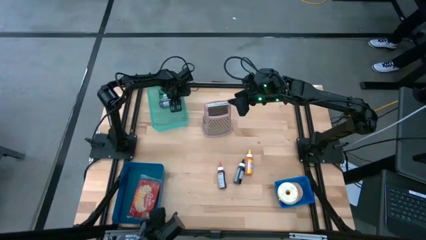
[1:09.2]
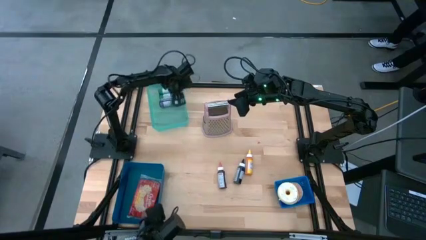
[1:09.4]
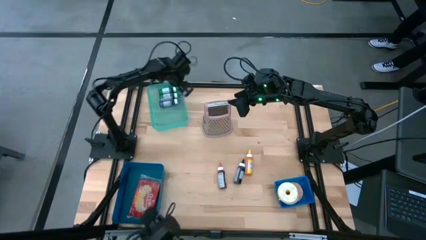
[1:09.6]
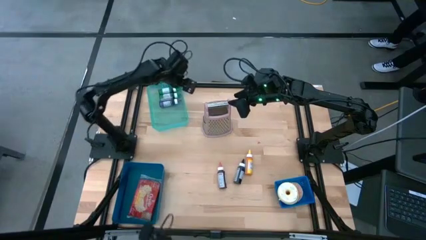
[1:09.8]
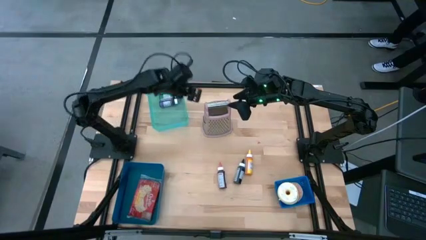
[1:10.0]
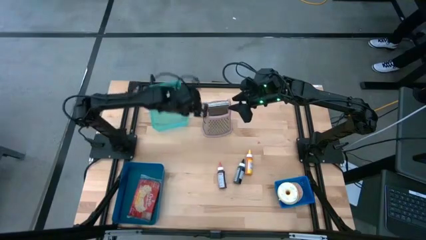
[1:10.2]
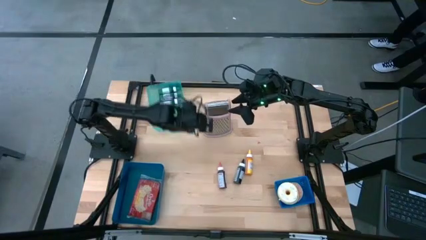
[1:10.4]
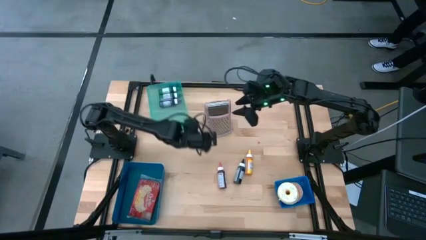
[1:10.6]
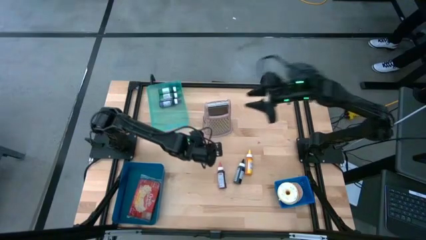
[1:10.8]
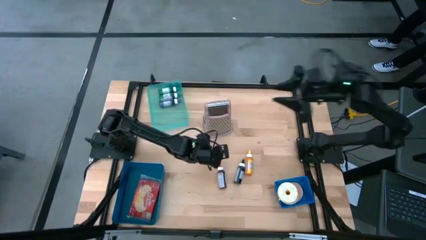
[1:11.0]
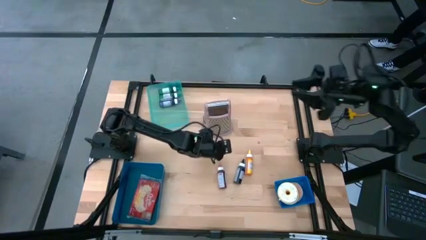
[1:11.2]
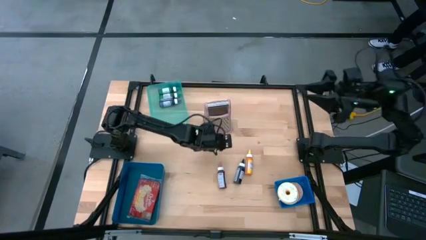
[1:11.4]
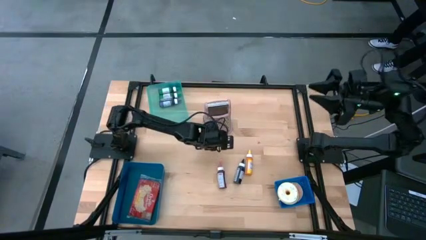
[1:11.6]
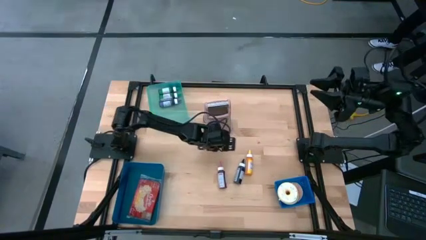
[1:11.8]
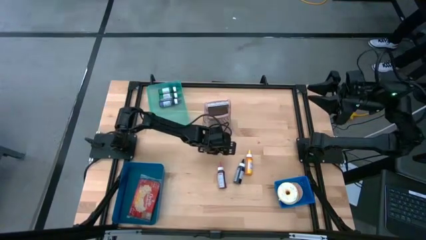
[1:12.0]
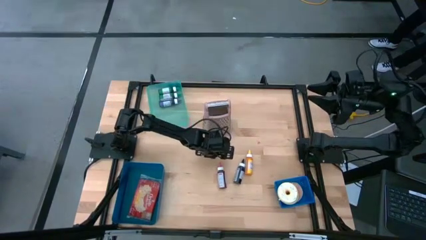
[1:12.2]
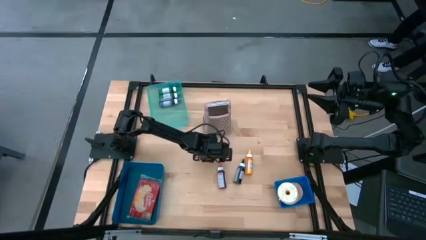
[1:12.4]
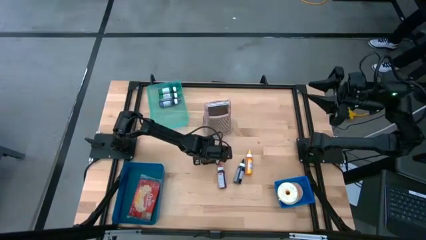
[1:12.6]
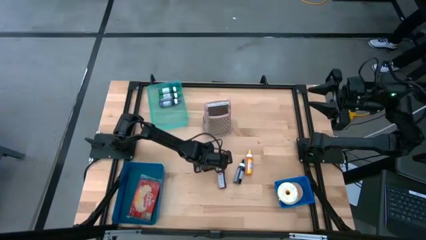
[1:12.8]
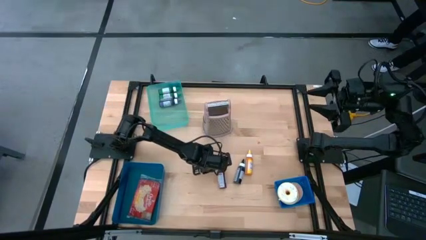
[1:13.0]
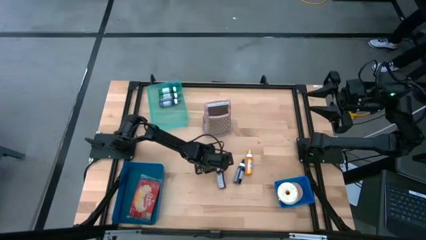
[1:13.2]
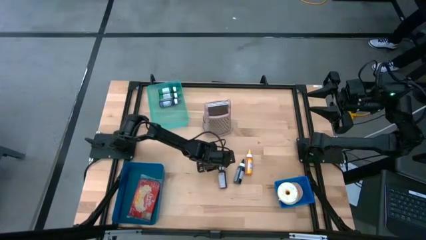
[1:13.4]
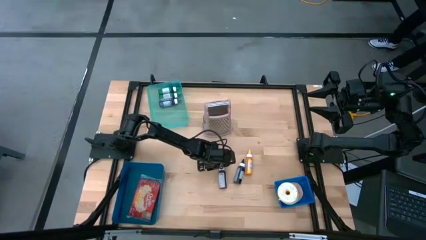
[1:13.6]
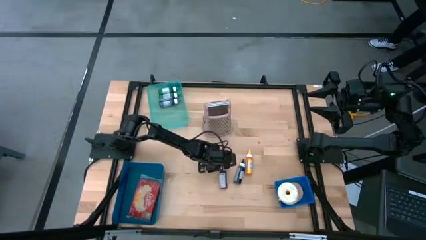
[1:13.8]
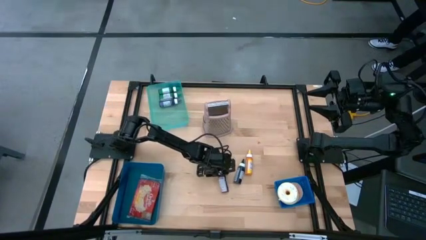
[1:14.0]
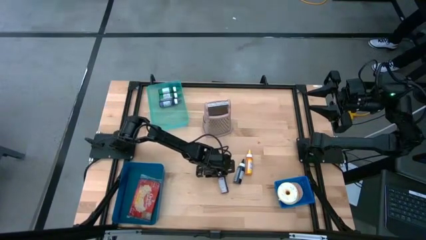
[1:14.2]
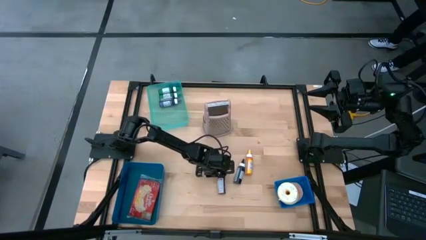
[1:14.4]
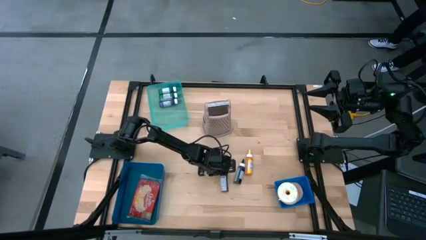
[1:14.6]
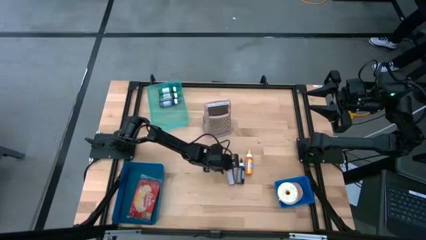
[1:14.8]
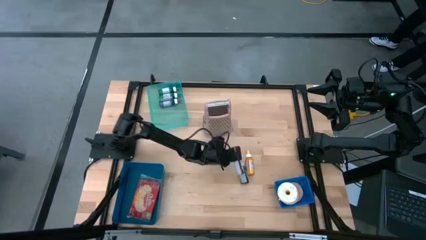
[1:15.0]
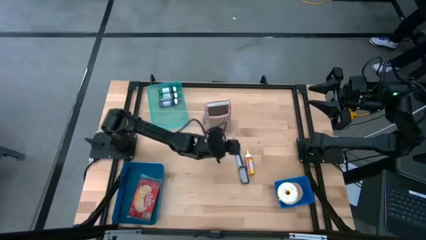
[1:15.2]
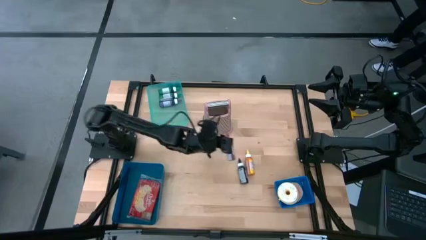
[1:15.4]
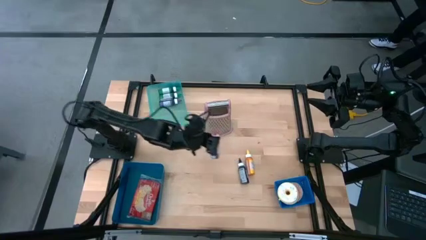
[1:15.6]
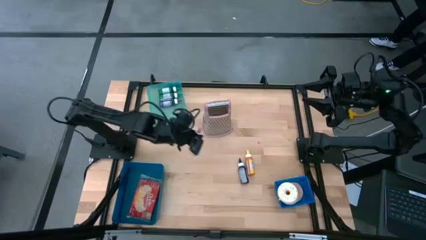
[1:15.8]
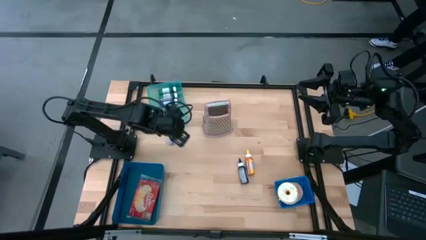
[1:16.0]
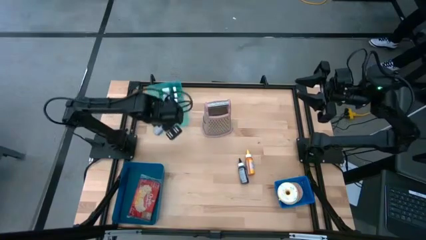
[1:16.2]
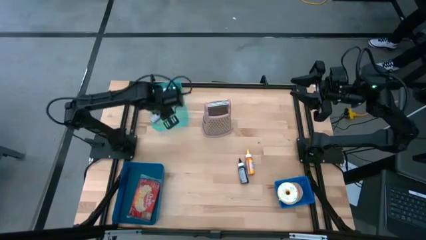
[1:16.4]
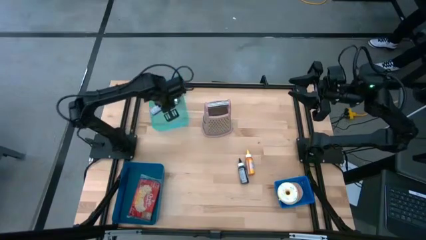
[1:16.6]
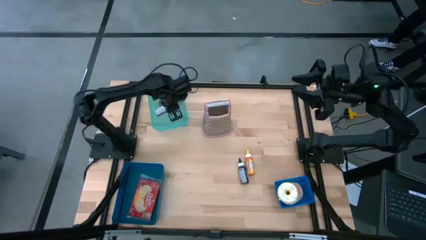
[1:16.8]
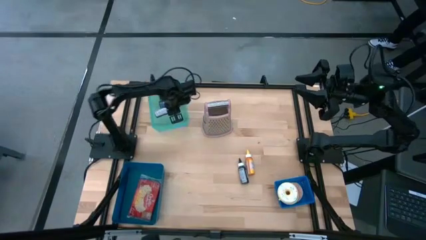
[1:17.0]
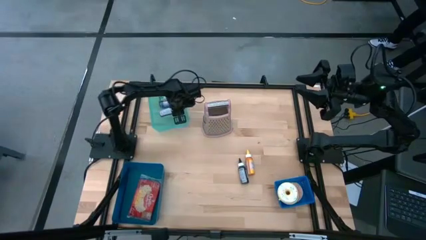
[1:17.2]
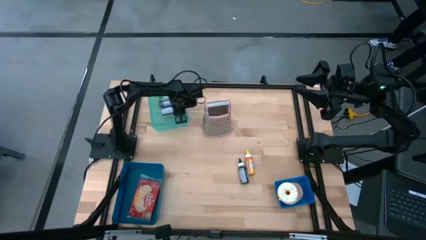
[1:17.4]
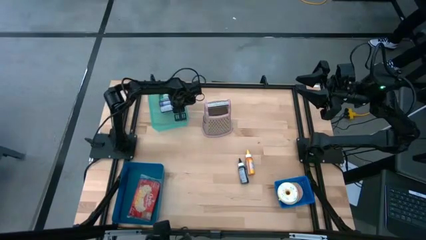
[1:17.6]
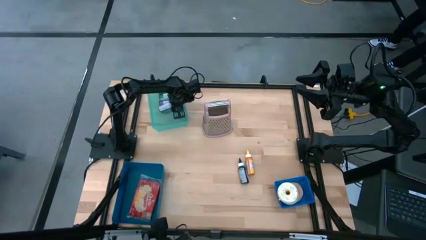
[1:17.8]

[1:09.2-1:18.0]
Put the pink food coloring into the green bin

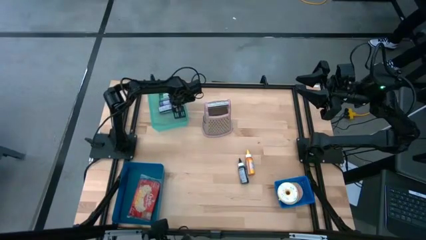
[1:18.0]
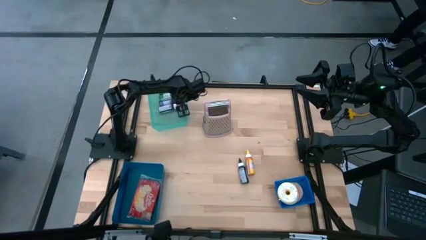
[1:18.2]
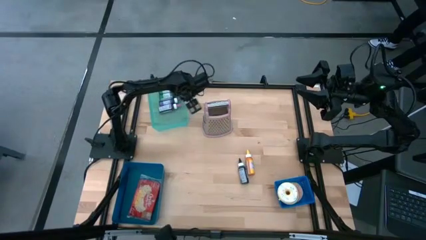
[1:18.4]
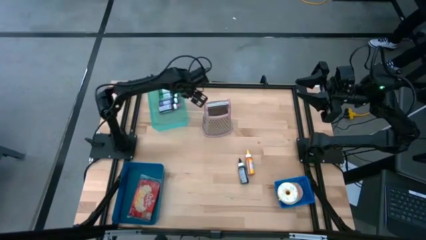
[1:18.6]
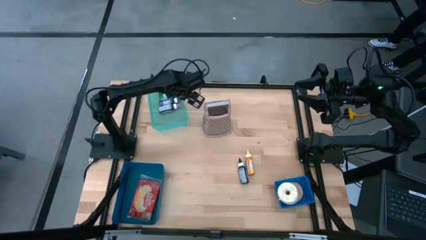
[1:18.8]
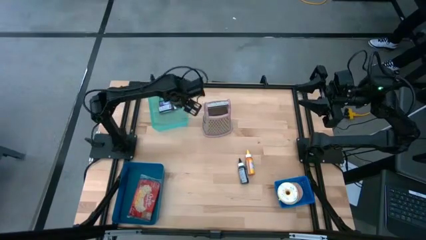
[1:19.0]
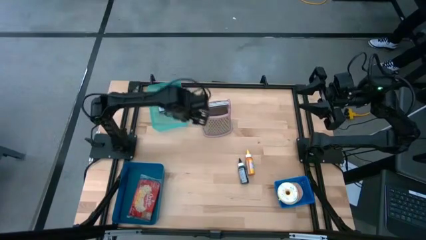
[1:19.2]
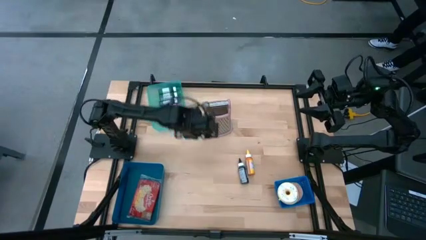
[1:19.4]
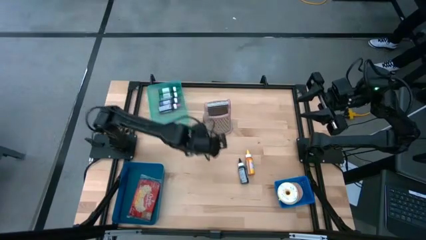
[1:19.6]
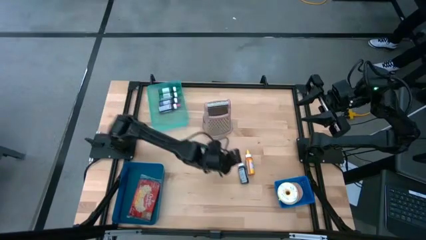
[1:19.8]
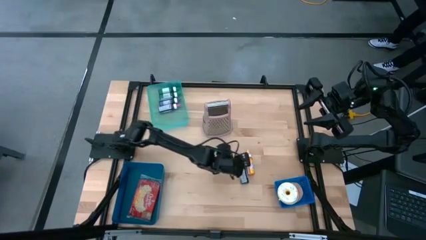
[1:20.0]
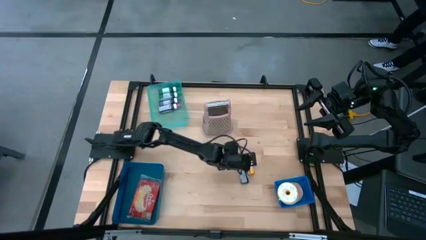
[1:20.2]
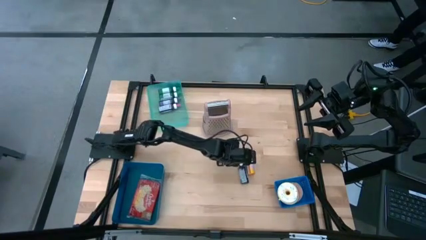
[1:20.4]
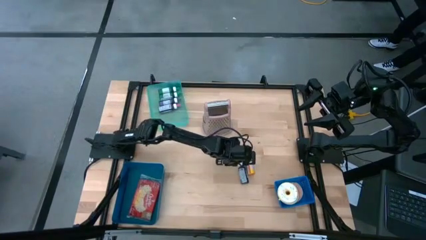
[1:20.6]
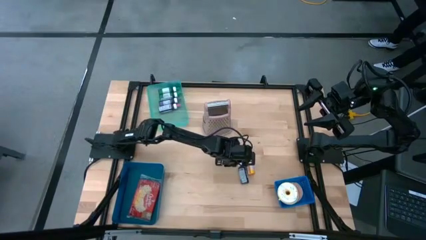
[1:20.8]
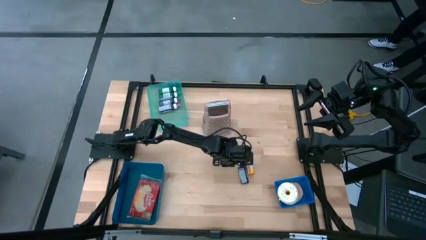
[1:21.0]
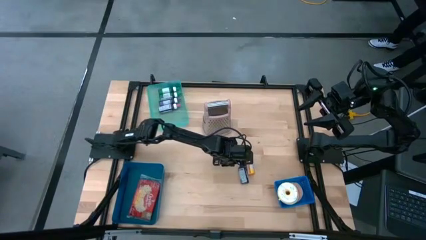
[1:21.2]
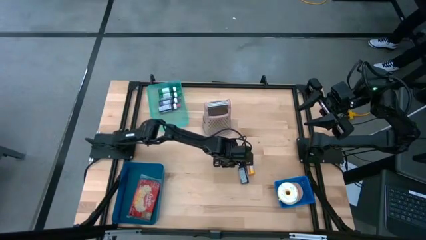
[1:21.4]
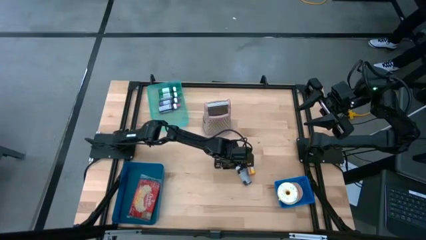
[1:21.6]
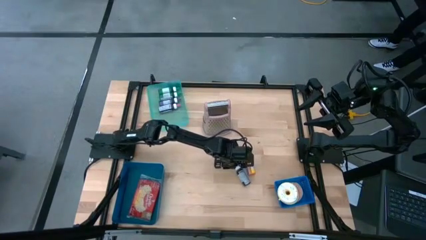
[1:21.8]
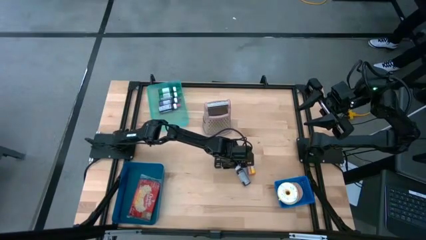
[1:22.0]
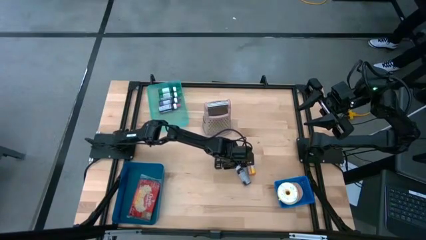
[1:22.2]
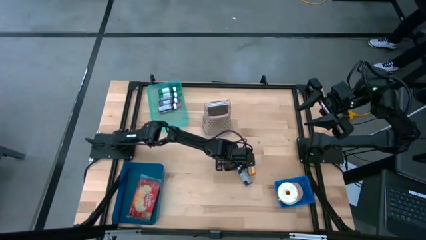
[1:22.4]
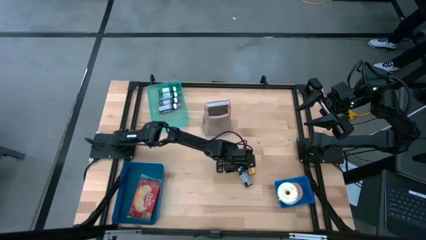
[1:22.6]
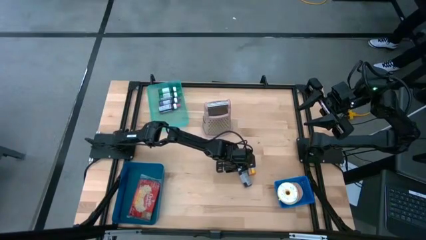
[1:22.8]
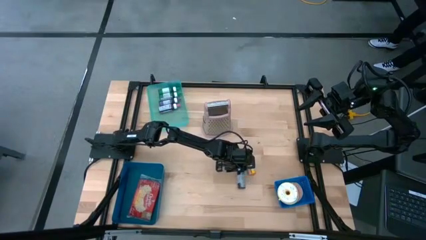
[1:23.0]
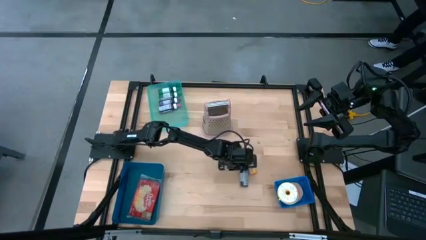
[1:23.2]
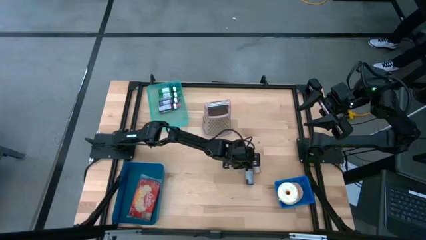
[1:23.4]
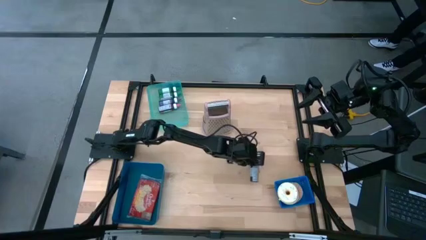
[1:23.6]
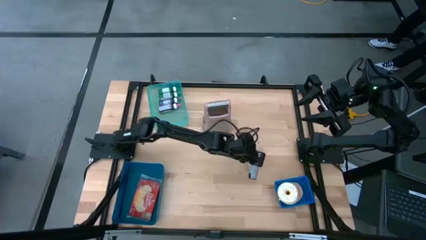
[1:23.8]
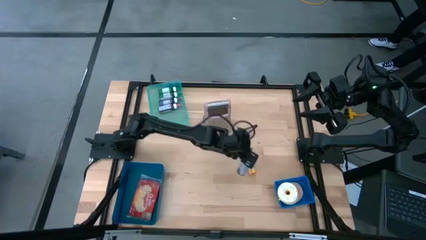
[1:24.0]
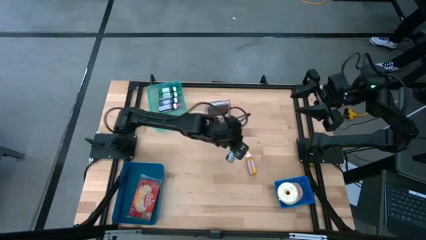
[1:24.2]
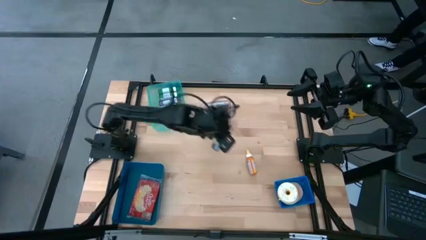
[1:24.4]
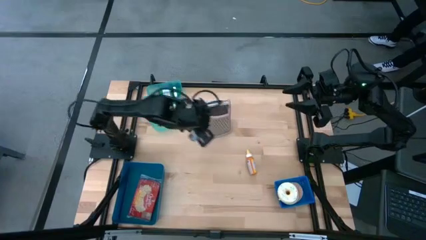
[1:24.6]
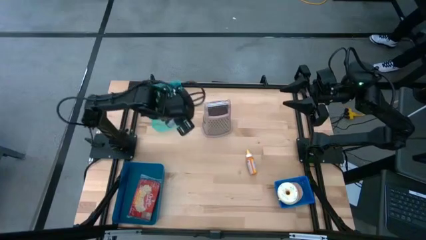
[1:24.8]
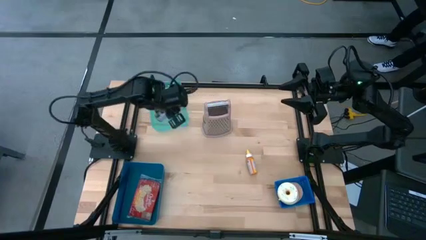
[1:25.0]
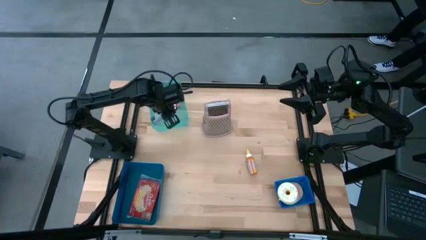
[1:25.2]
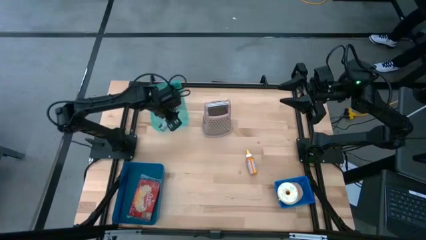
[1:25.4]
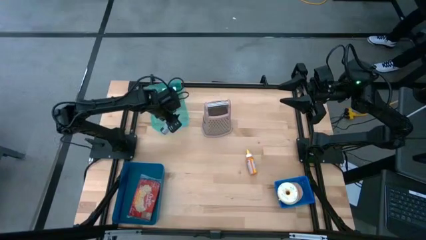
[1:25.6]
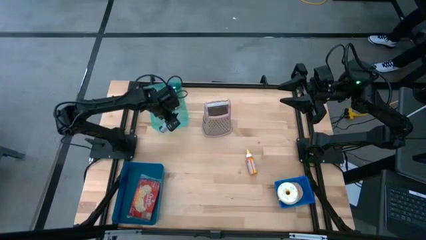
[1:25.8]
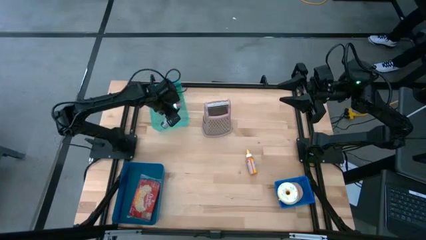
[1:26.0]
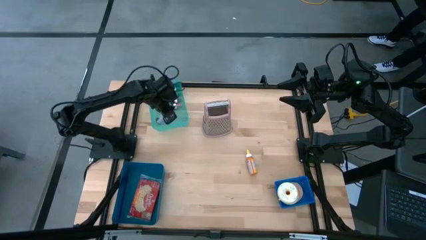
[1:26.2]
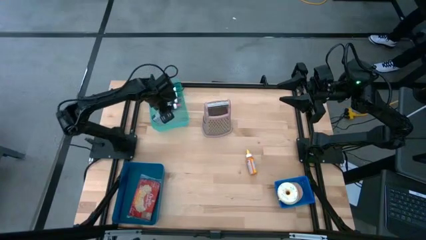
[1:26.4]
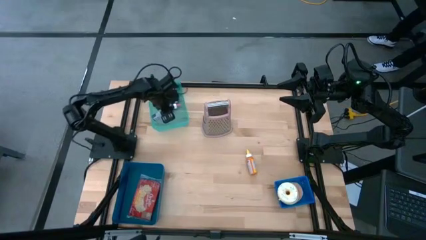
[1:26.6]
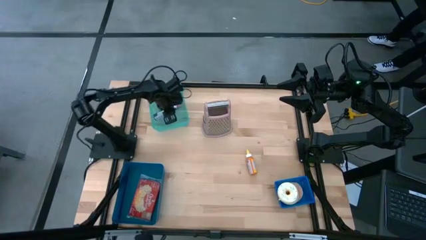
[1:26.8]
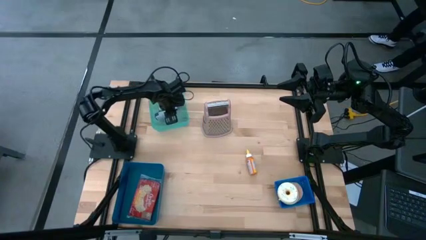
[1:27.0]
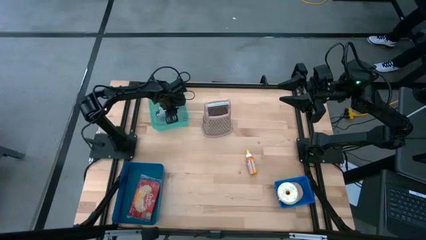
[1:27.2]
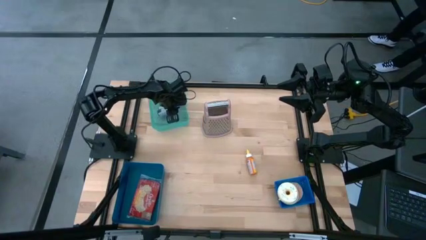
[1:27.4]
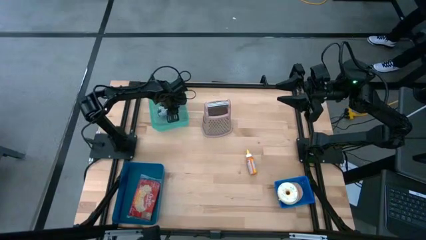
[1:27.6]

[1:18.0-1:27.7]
Put the black food coloring into the green bin
